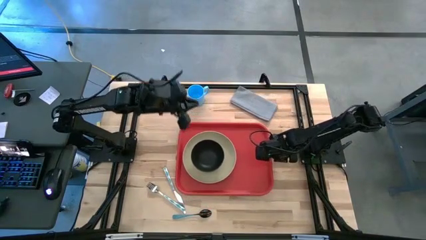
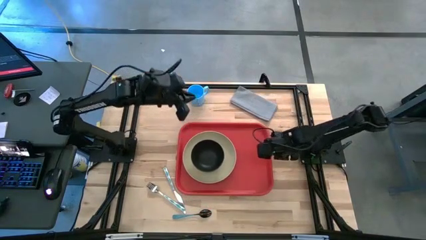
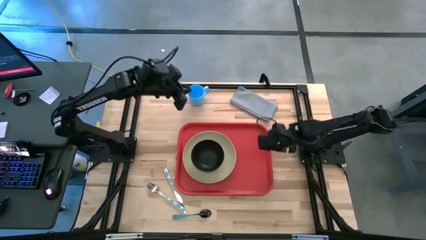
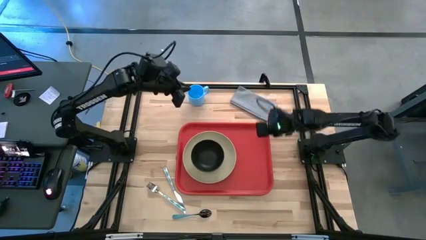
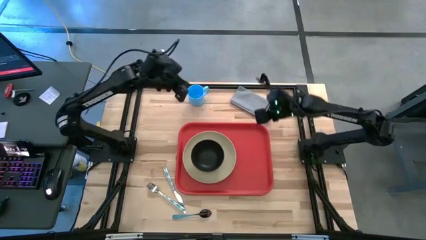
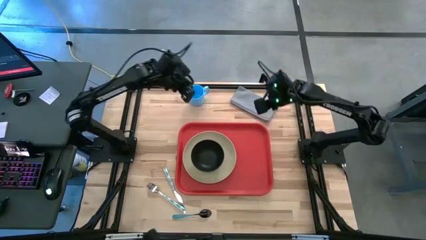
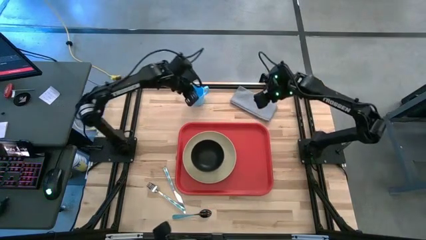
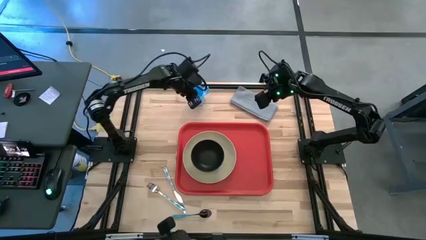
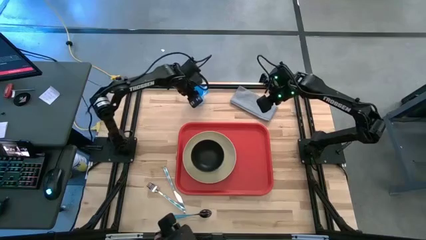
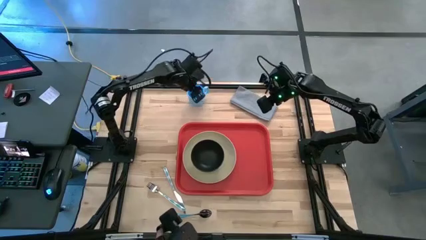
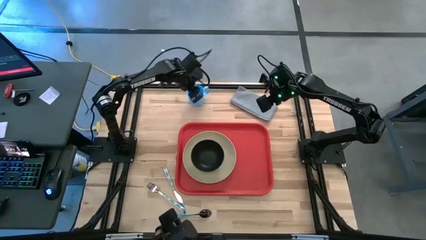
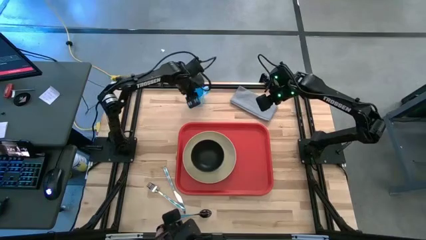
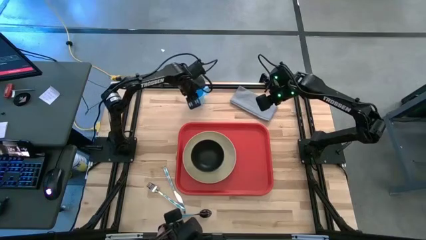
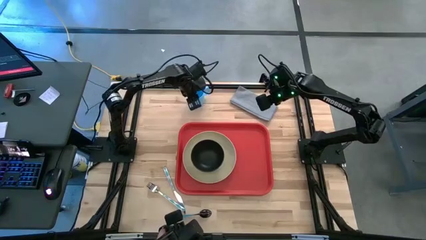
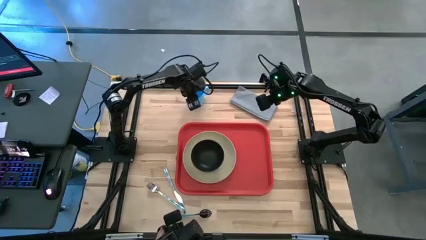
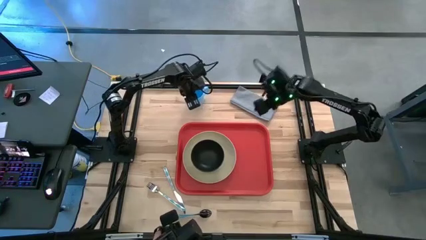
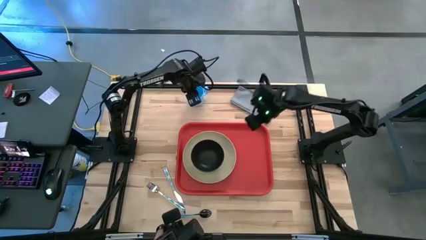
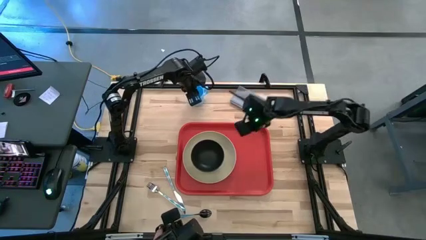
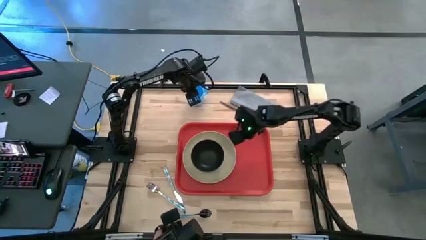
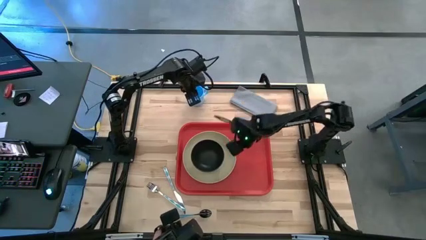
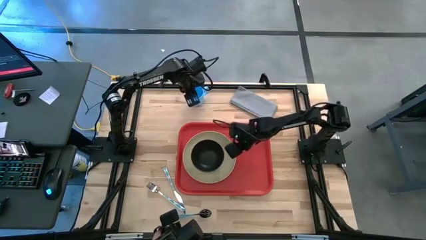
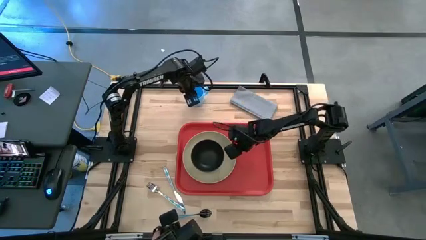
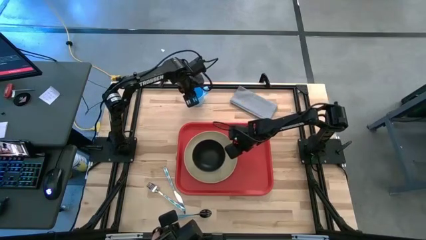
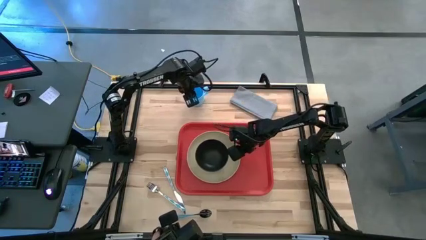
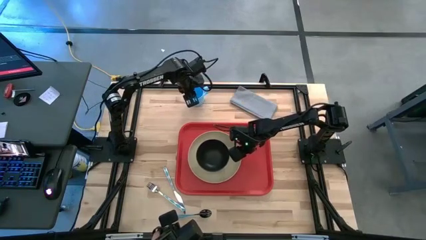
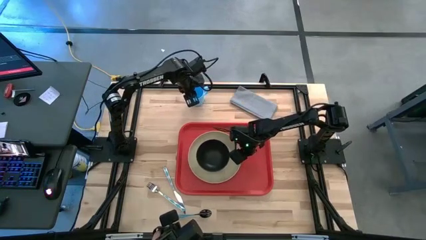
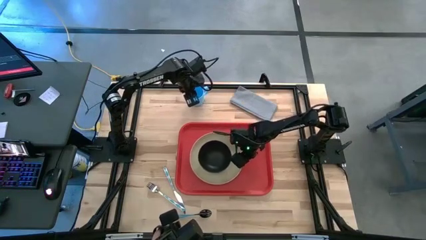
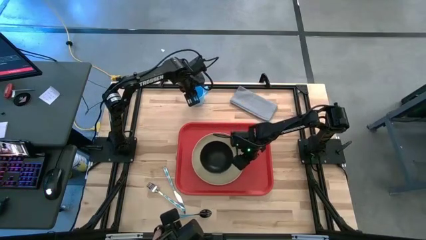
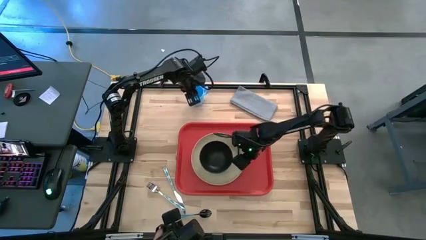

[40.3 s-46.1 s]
Task: Set up tray
Adjust the brown plate

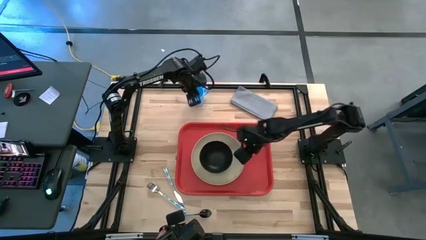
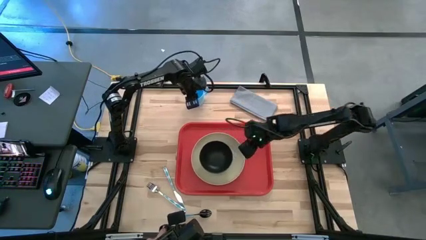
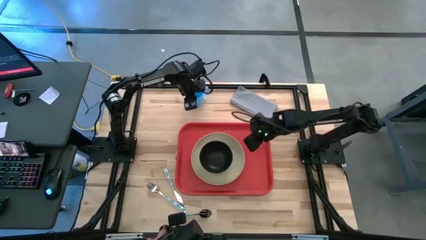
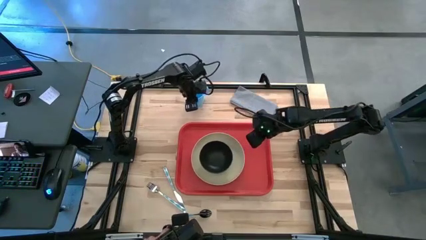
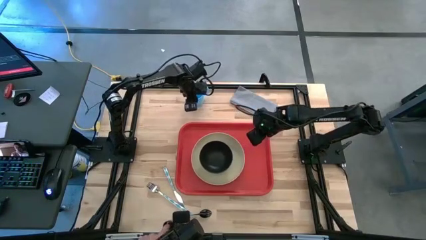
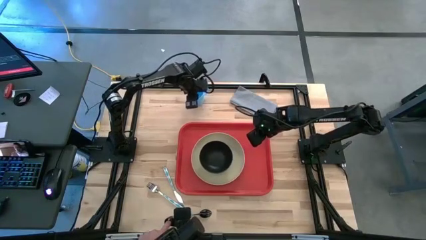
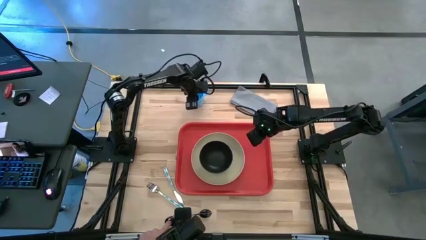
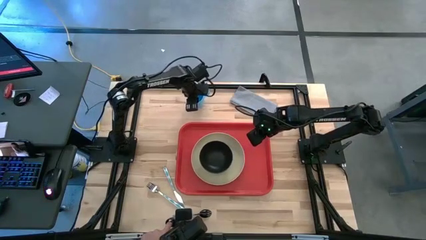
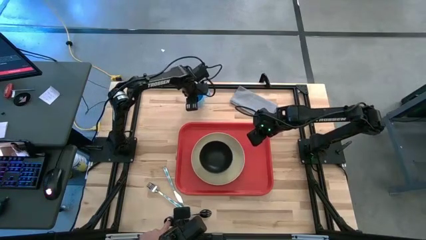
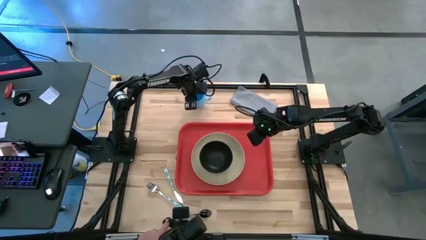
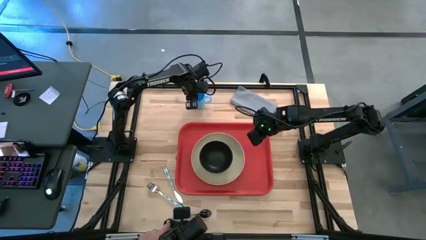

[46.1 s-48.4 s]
Put the blue mug on the red tray to the top left of the brown plate

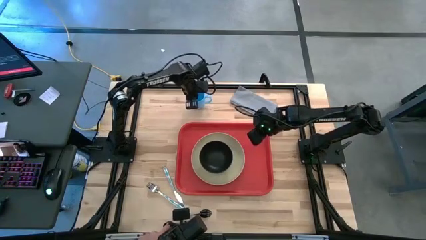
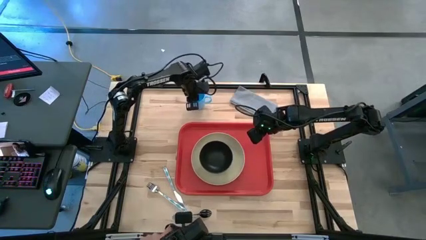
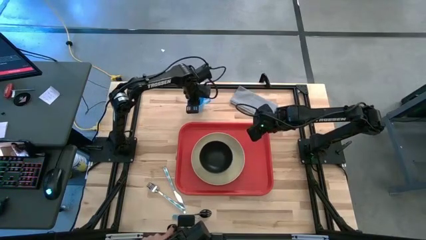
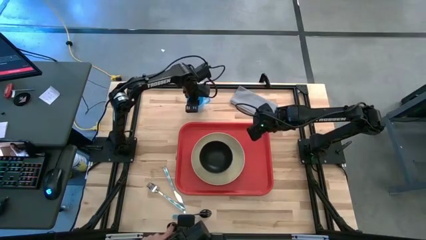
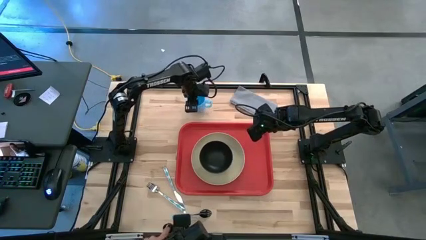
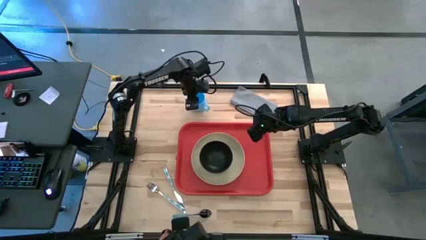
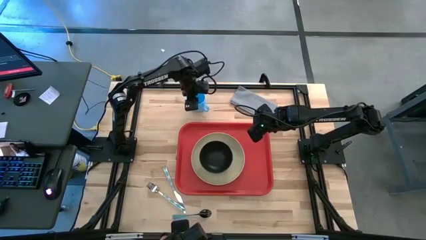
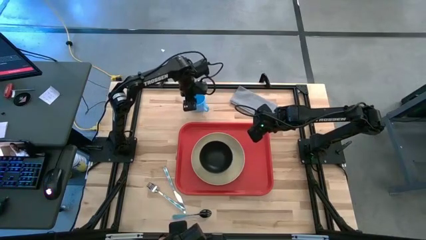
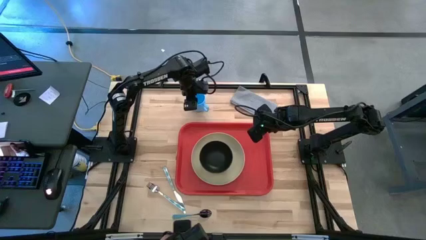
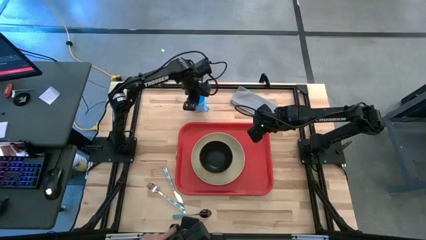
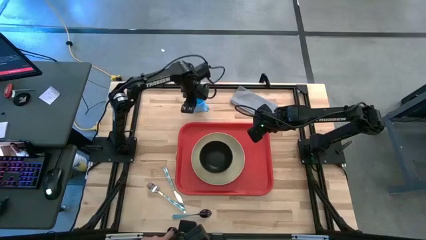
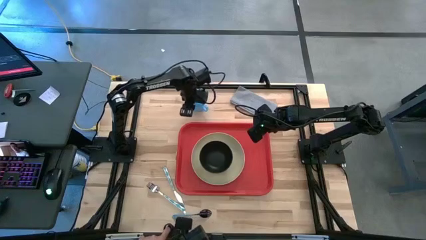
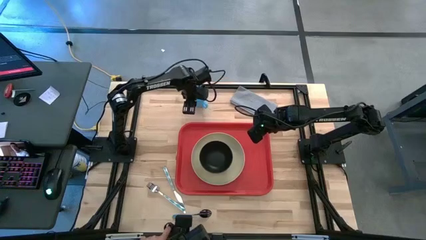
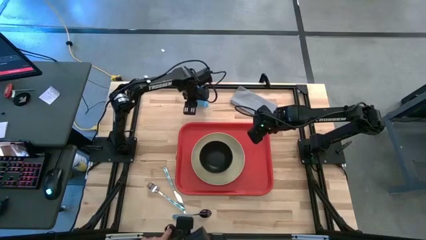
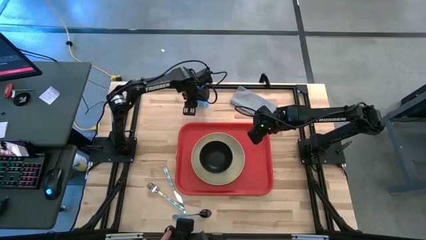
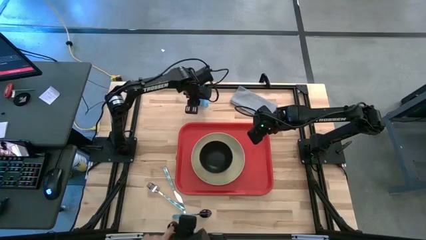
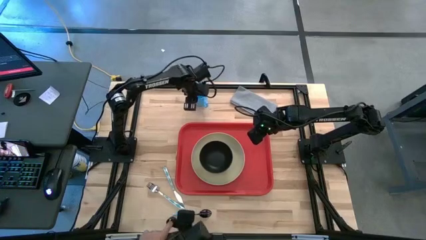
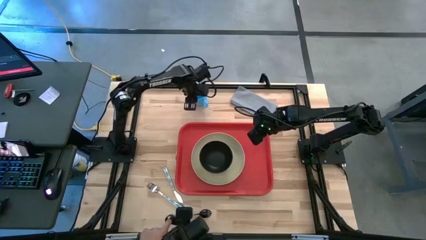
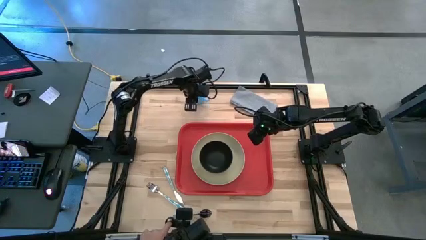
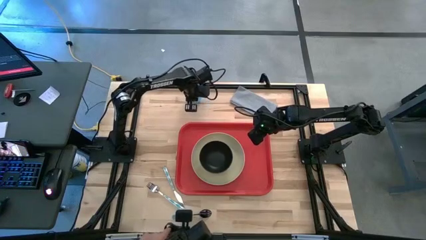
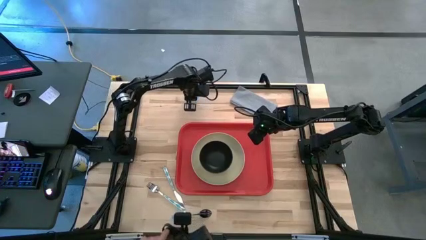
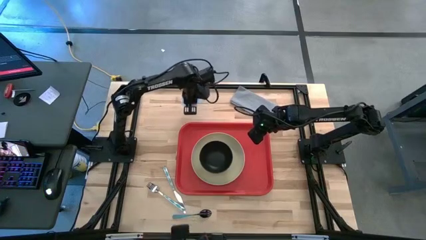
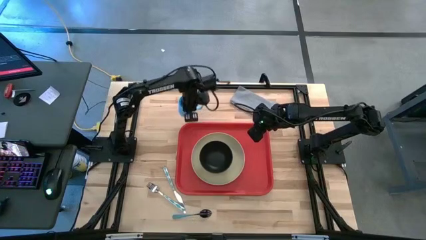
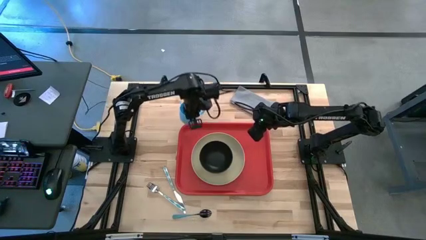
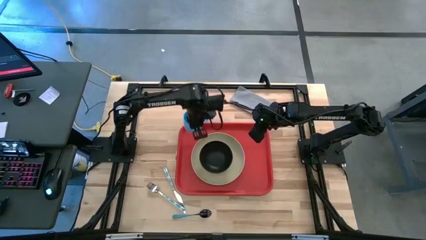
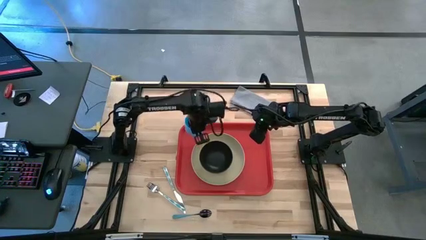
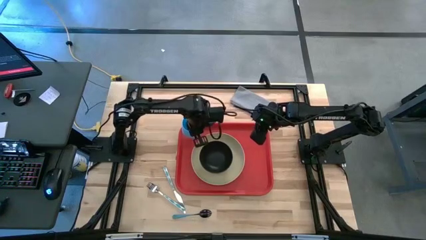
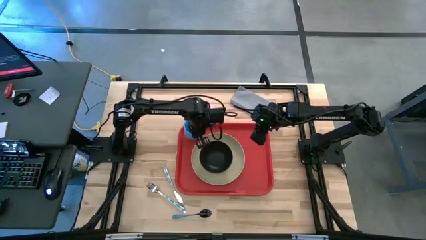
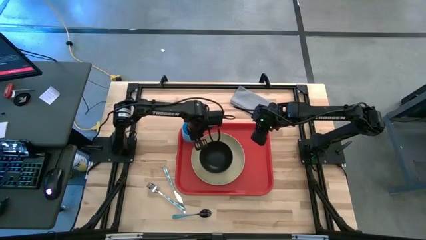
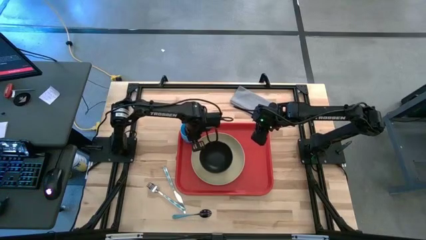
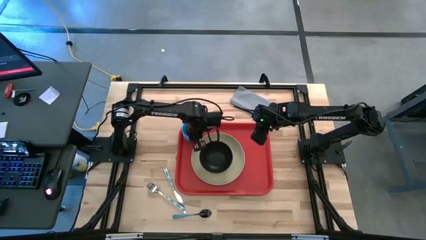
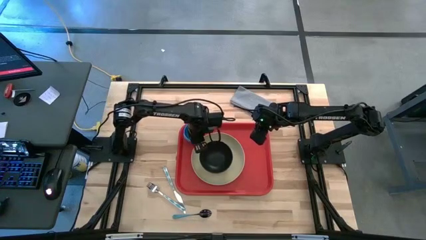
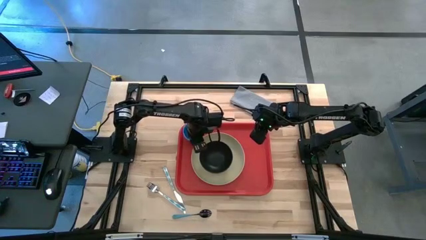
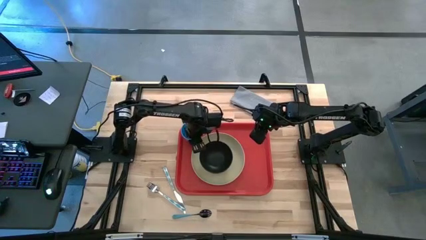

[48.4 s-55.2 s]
Put the blue mug on the red tray to the top left of the brown plate

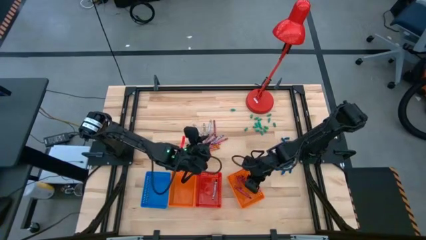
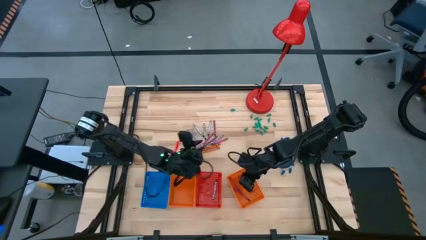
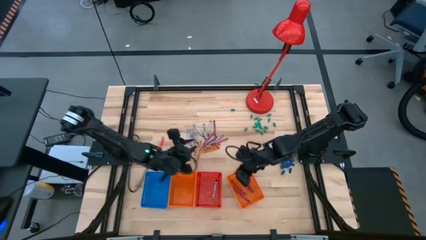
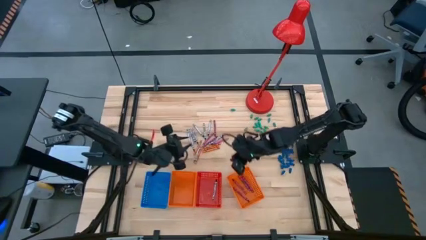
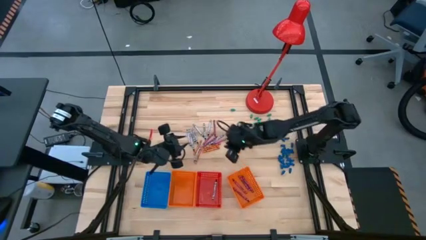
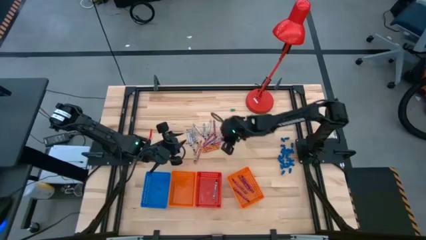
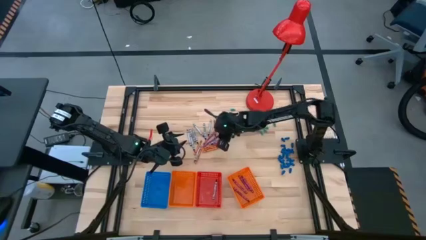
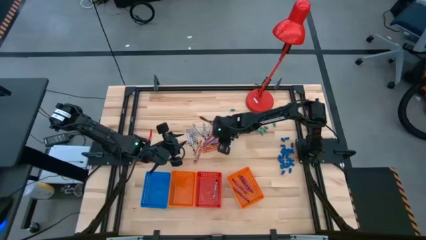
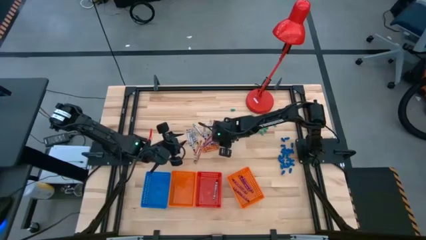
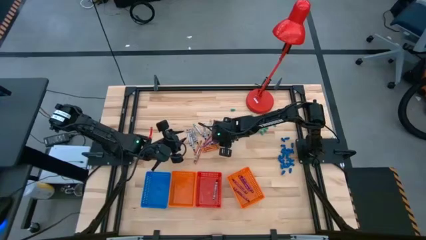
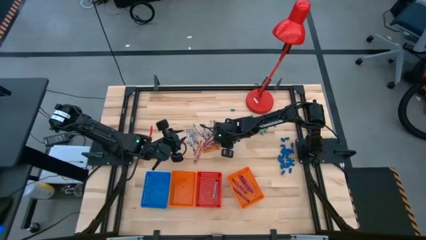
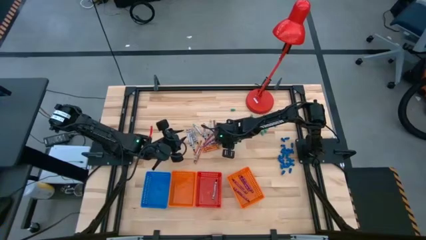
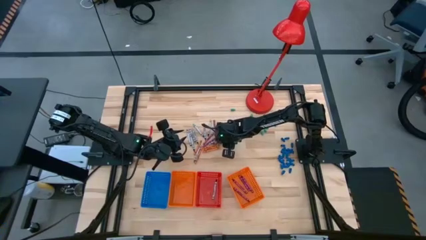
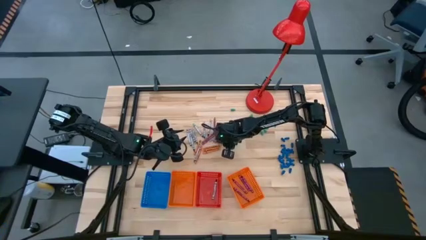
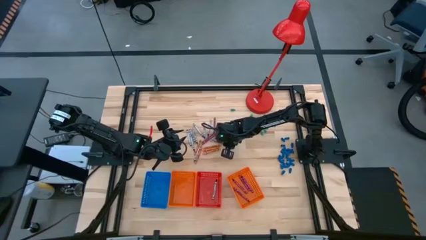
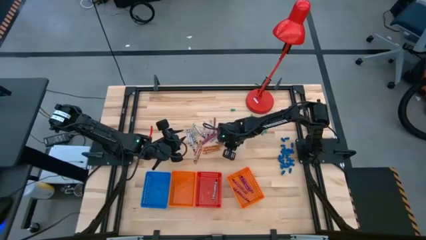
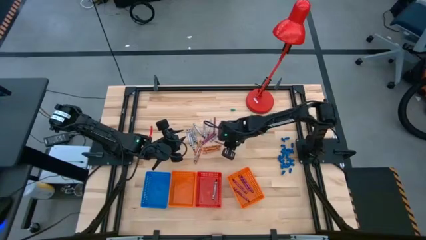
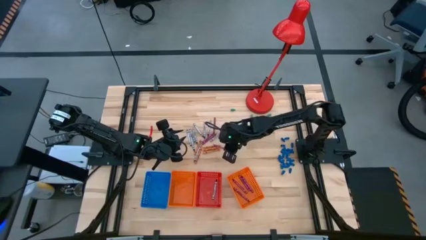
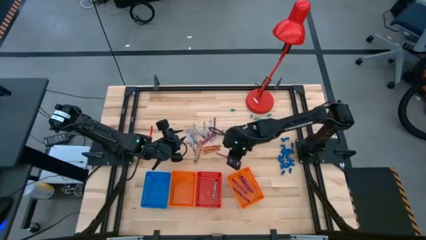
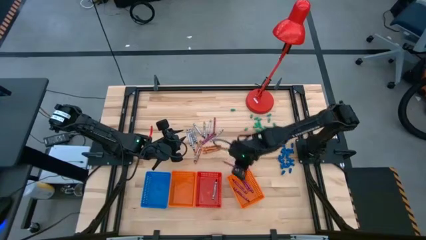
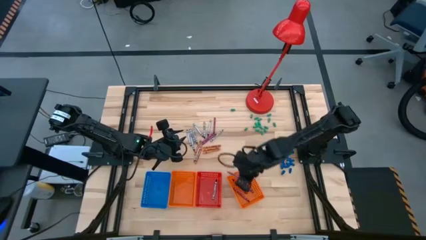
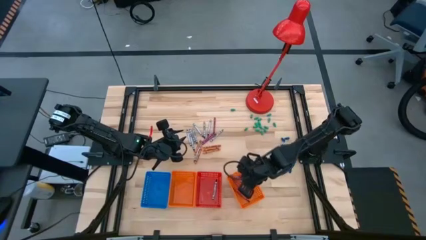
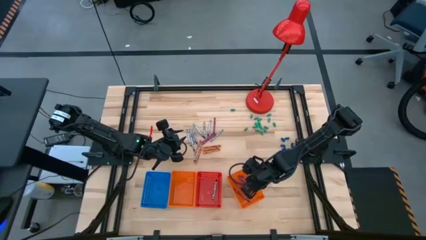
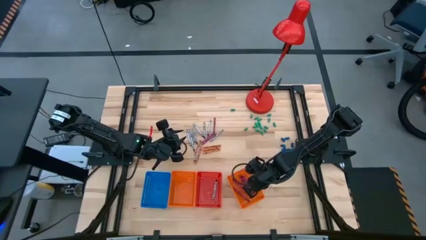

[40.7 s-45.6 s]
Task: Sort crayons
Put the red crayon into the right orange bin
